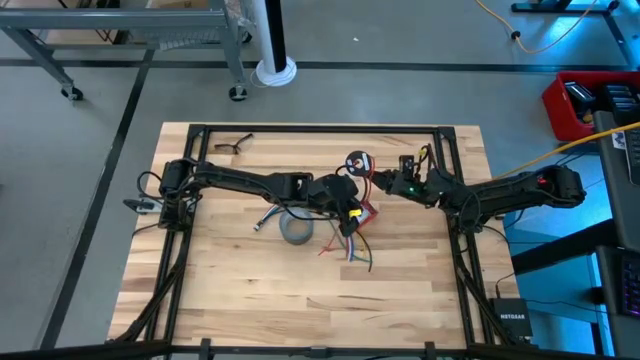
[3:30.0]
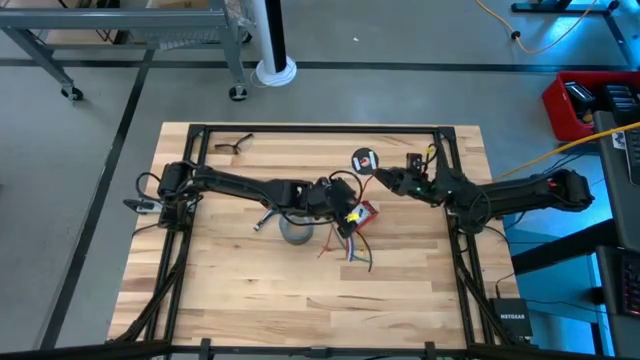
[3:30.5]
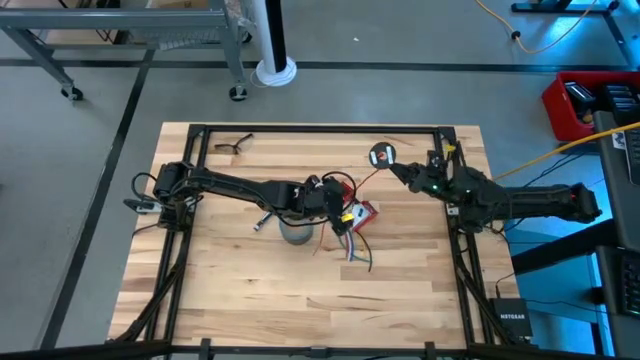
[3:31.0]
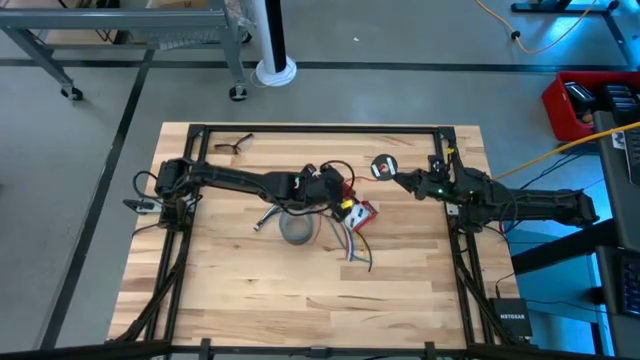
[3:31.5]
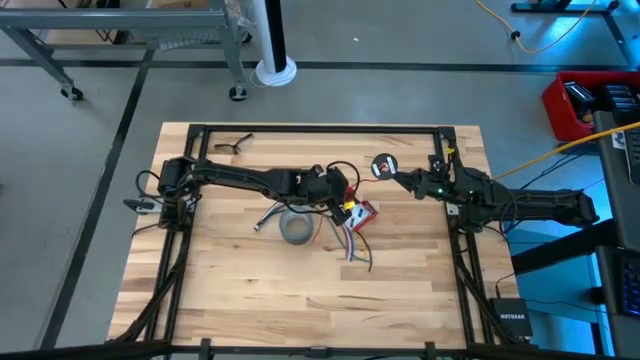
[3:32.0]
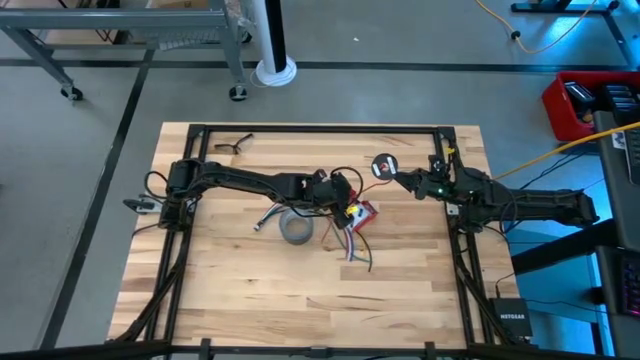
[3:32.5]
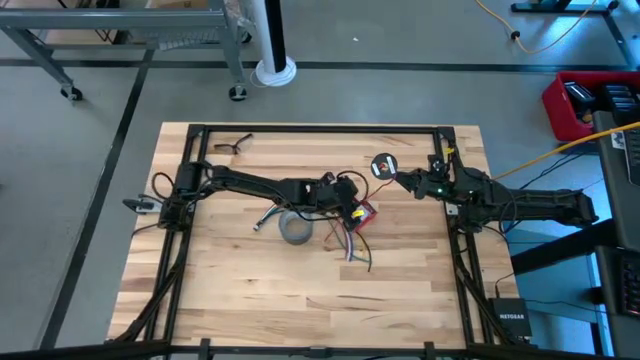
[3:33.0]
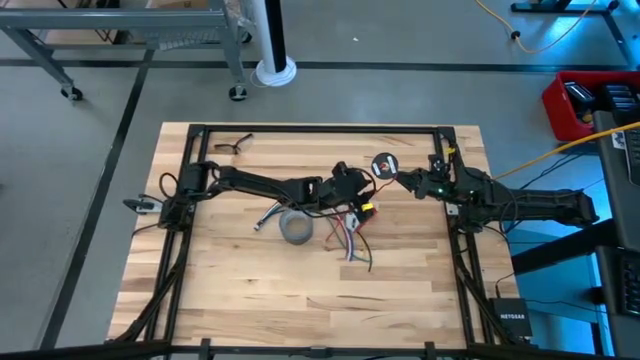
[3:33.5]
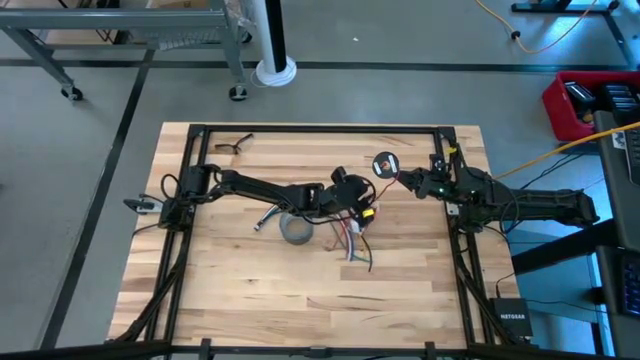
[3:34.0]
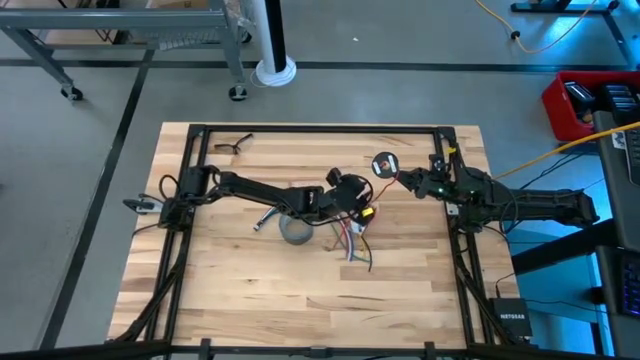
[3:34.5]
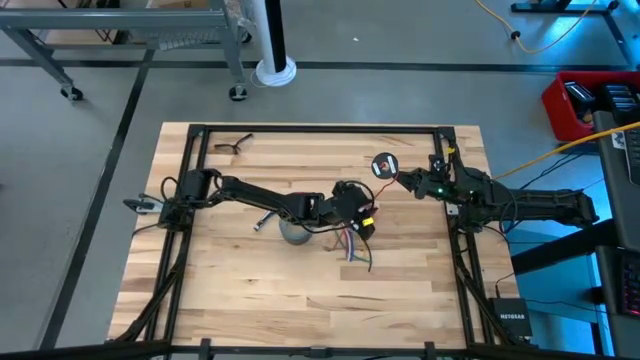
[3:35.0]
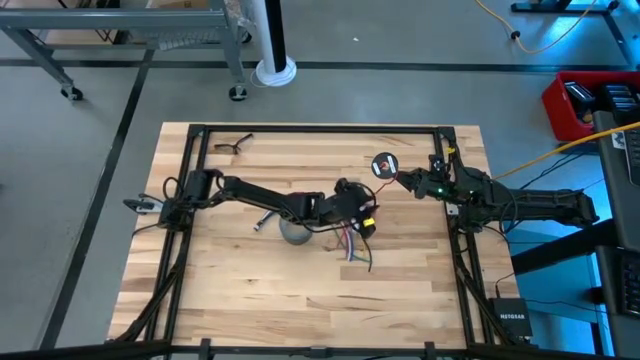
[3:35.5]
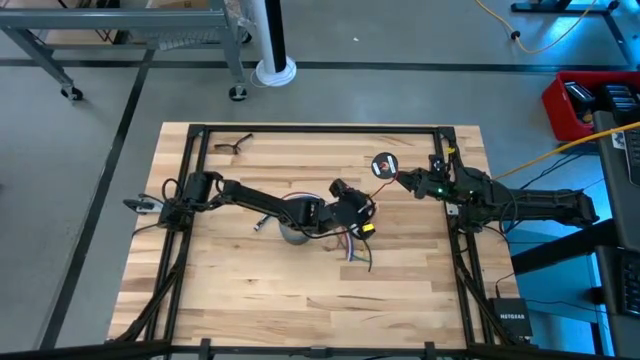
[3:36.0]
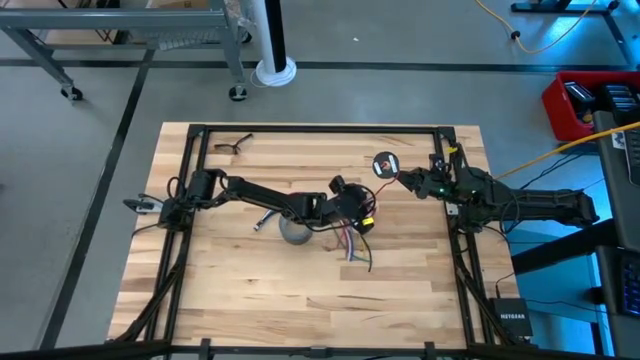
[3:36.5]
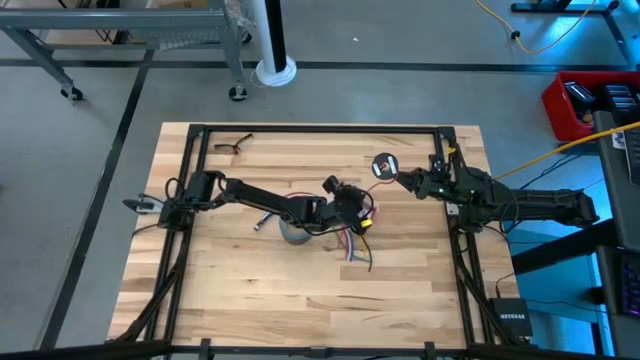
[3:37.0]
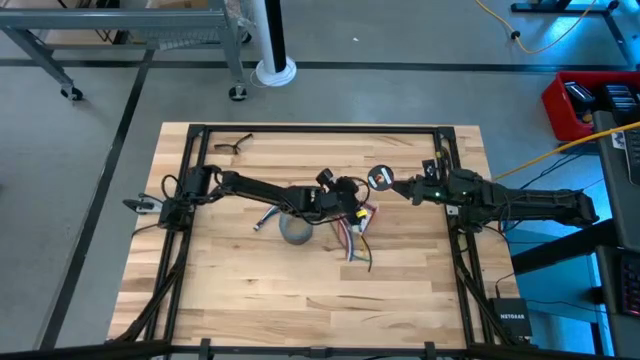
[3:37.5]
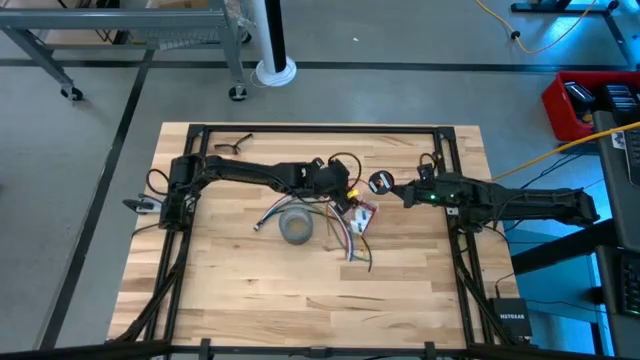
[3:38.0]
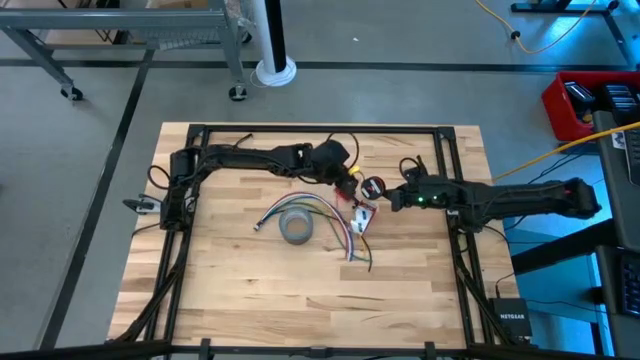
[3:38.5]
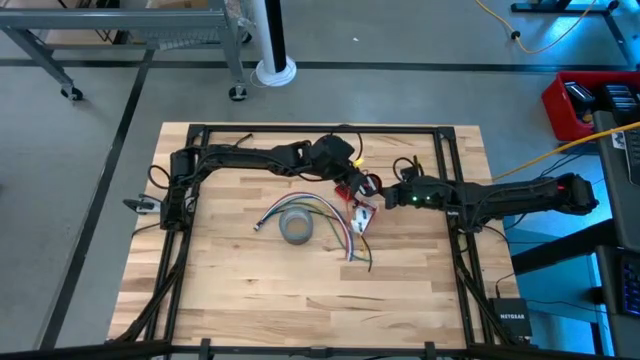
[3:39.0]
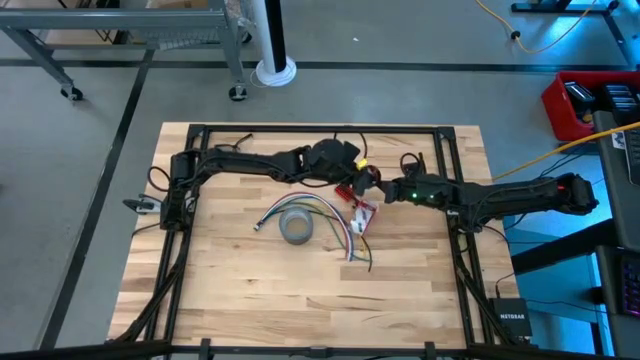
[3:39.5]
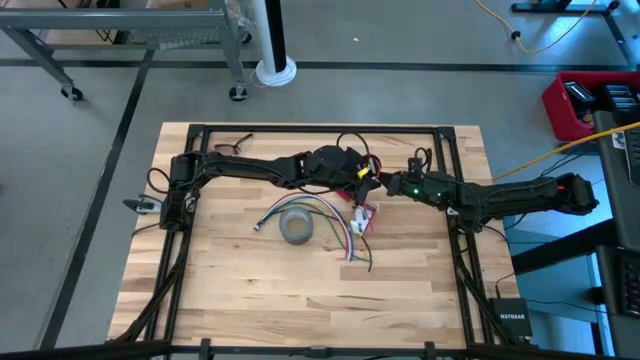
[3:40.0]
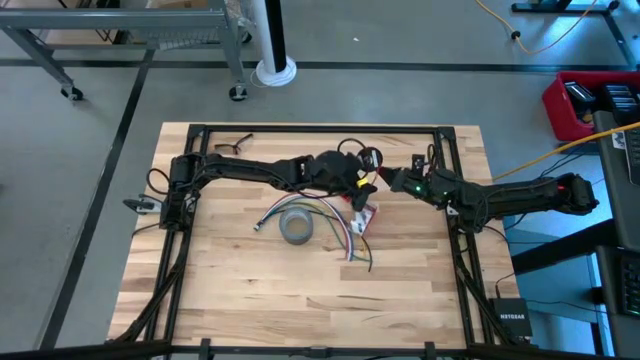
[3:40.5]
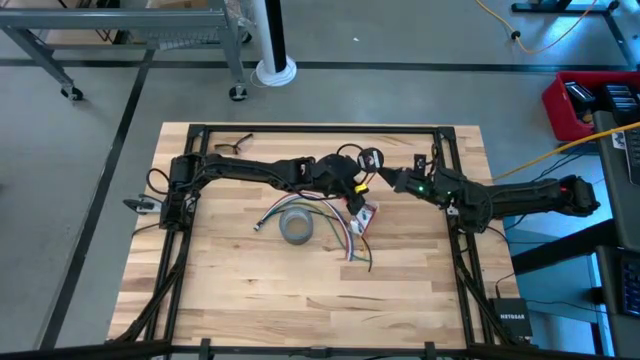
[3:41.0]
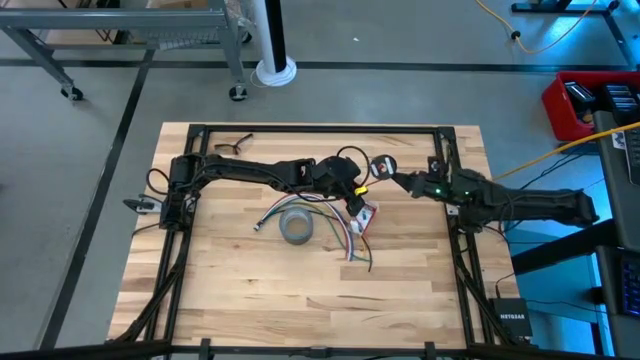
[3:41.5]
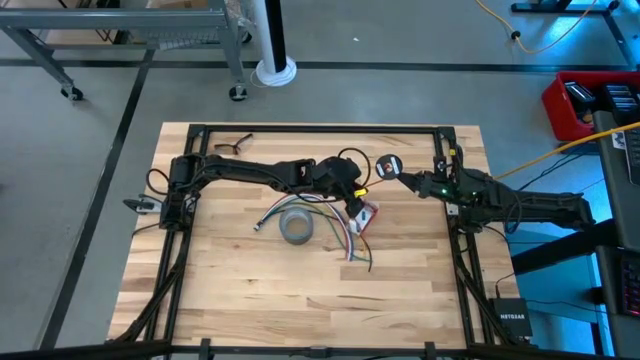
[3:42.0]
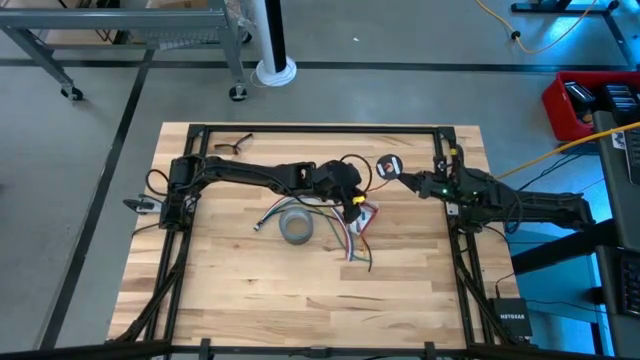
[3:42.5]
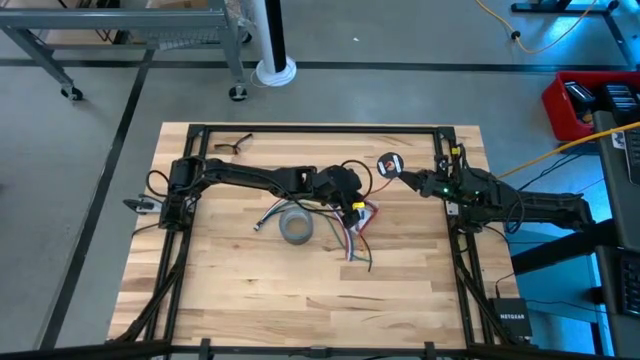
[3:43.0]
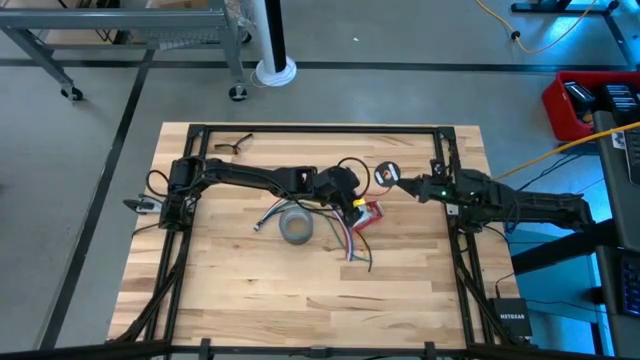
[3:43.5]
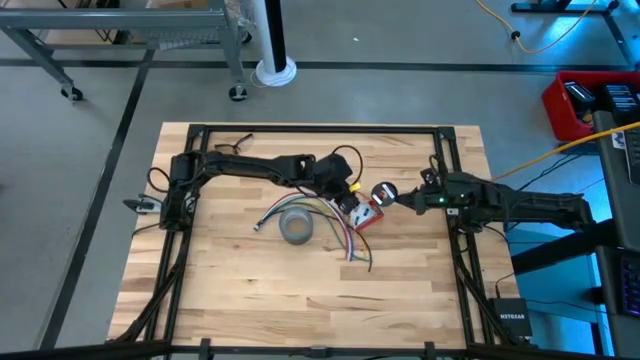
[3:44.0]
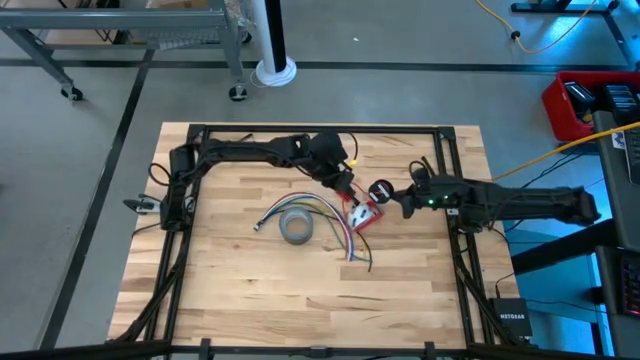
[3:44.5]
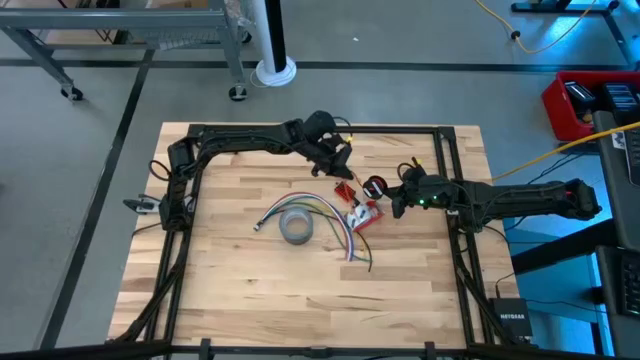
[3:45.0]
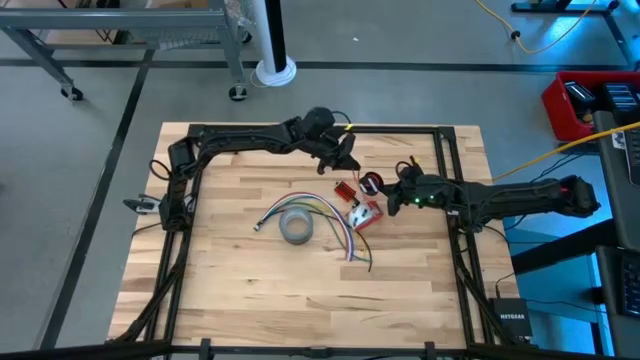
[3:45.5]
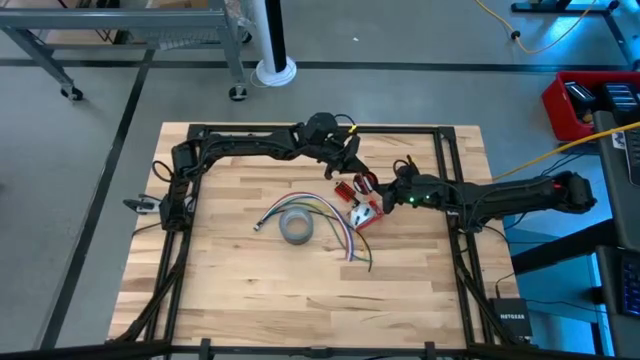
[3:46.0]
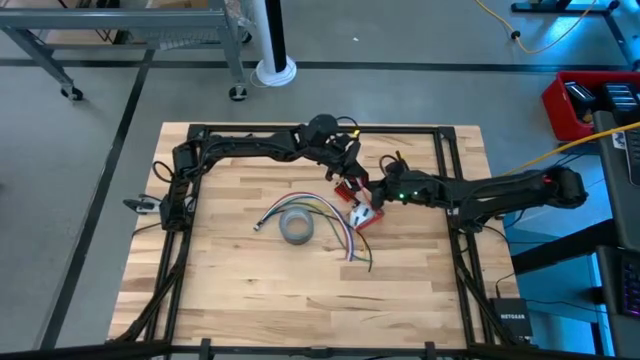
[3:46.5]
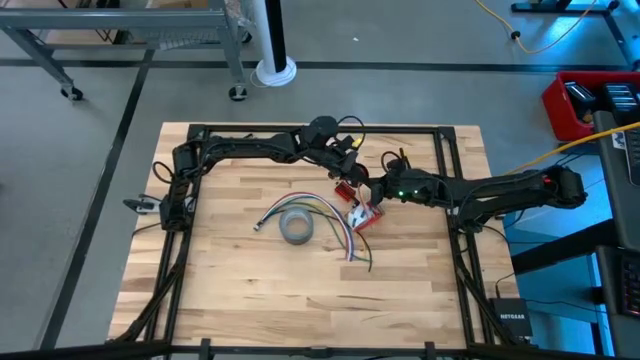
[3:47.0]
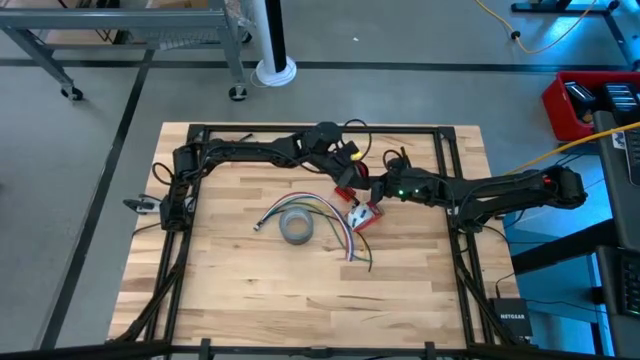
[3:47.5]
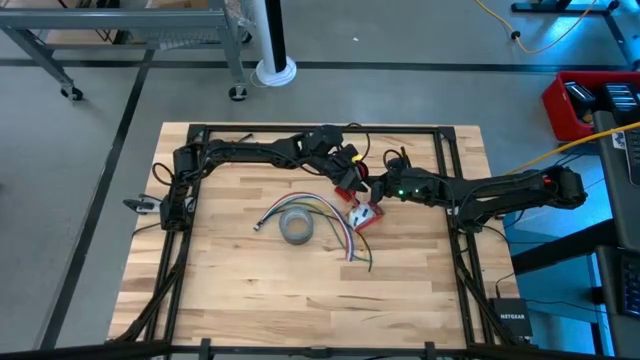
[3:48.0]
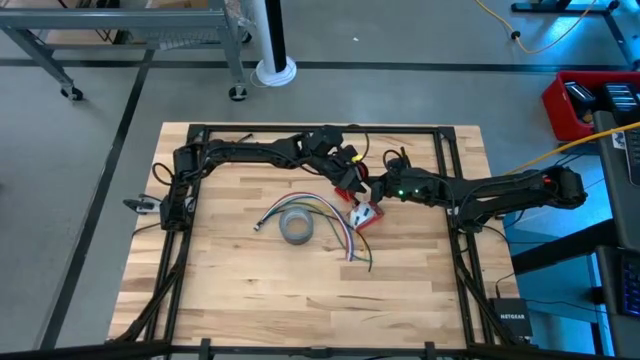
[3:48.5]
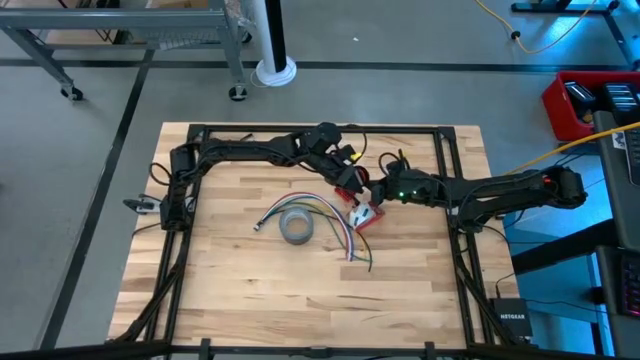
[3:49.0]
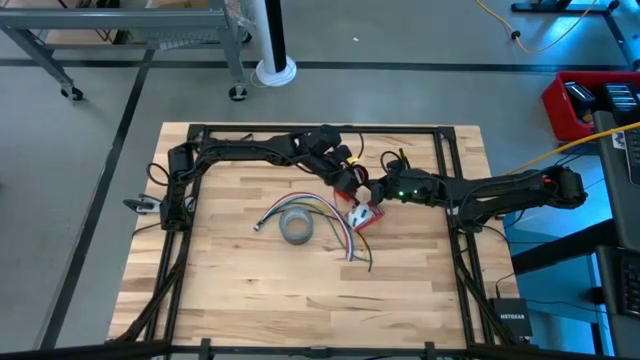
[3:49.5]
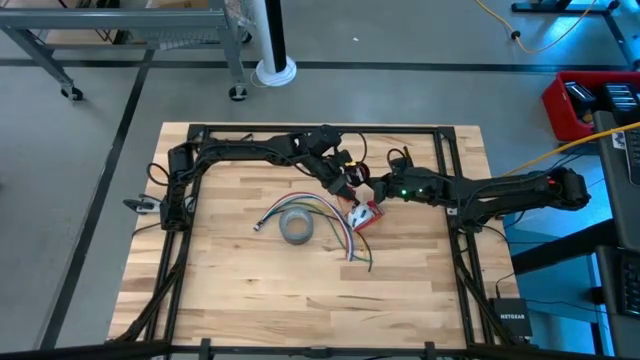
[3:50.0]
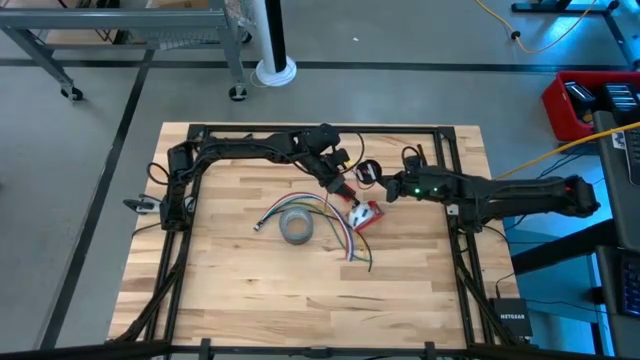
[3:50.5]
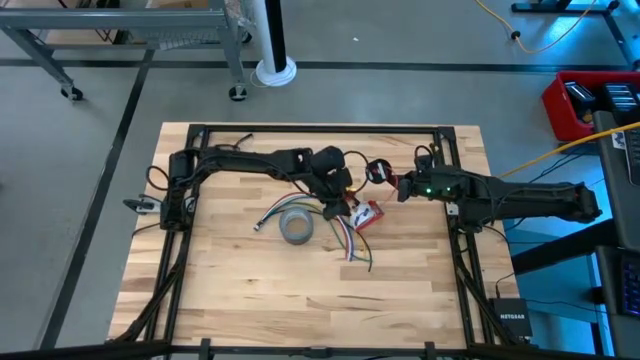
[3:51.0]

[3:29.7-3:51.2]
Task: Coil cords
Coil the red wire on the black spool
